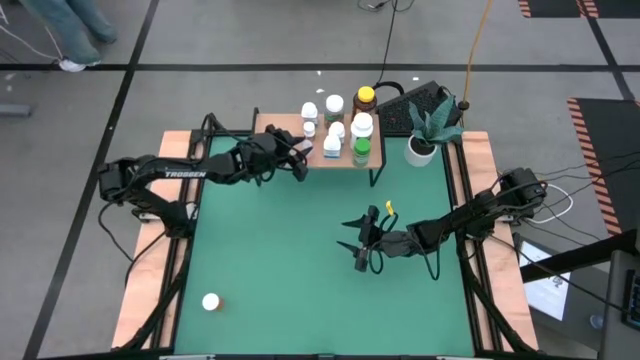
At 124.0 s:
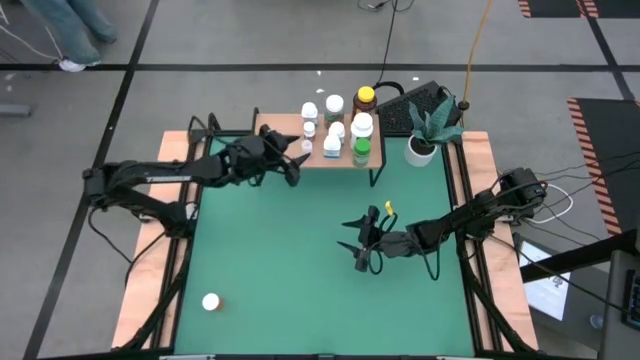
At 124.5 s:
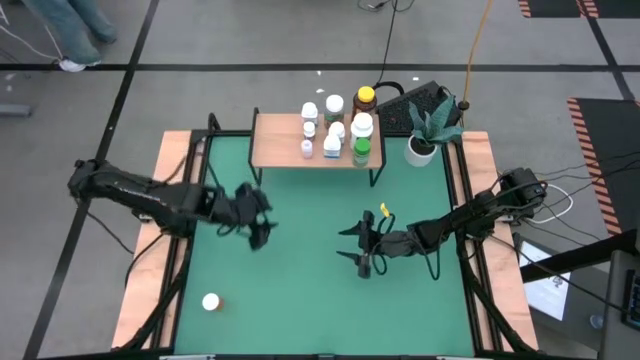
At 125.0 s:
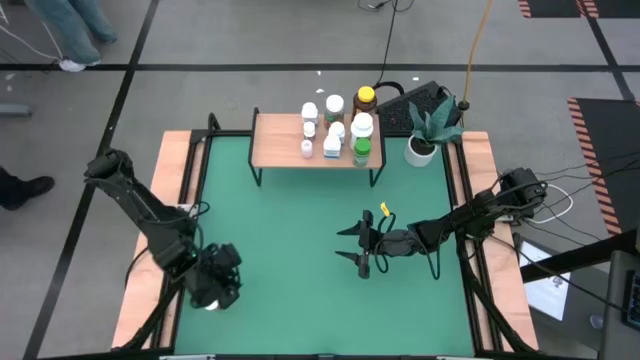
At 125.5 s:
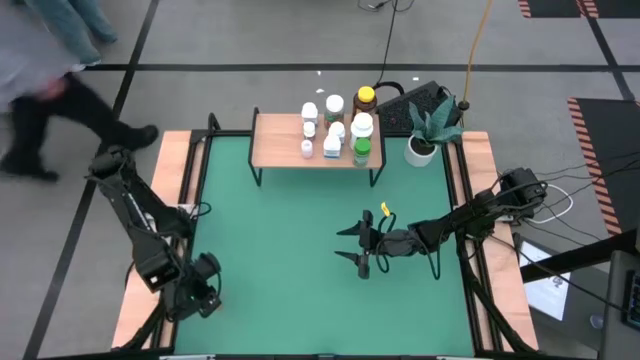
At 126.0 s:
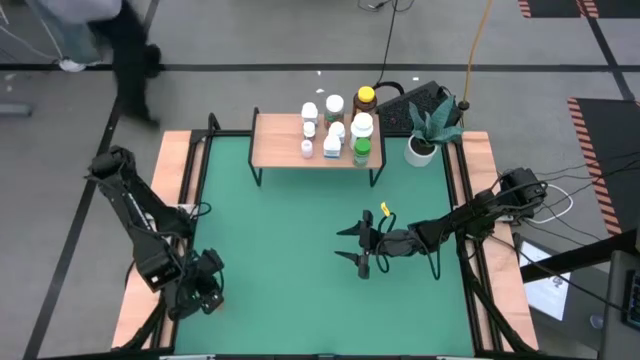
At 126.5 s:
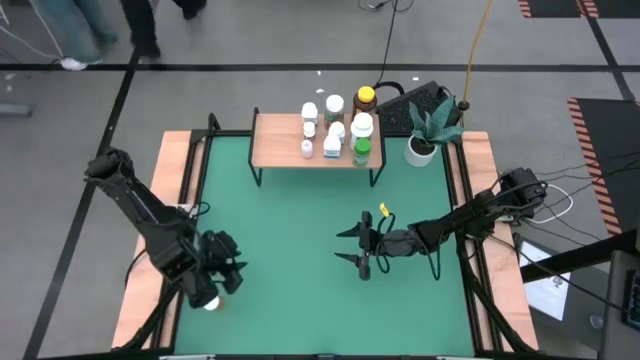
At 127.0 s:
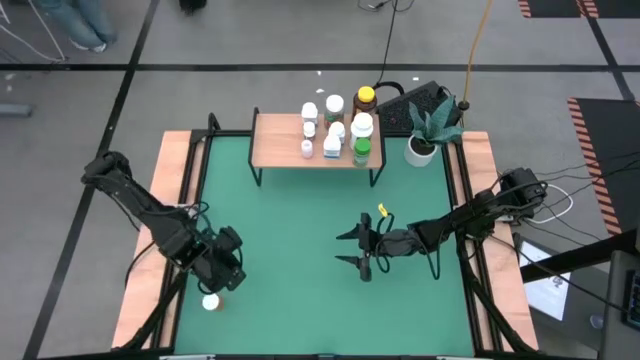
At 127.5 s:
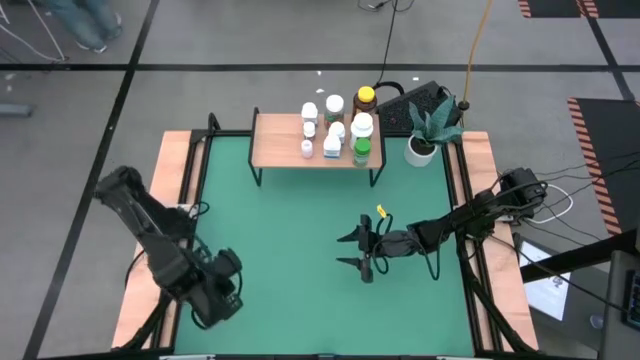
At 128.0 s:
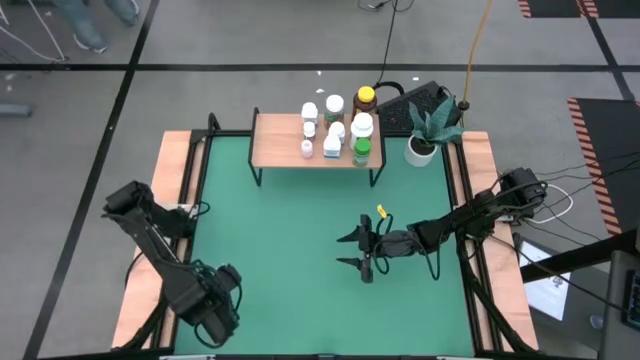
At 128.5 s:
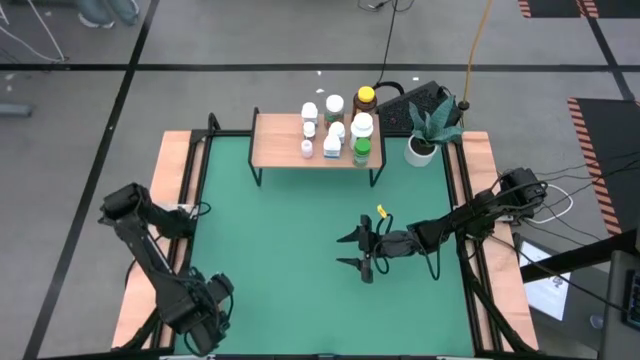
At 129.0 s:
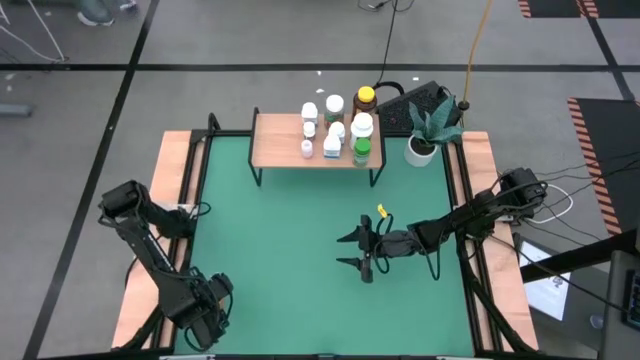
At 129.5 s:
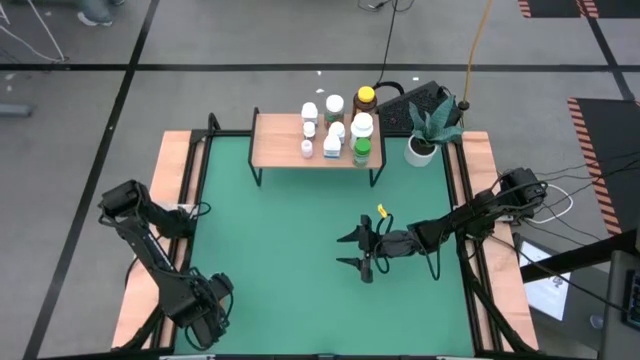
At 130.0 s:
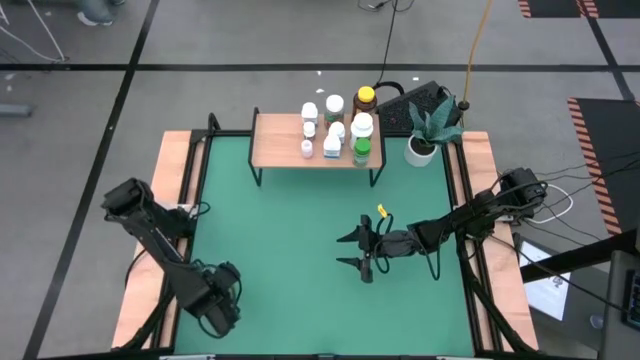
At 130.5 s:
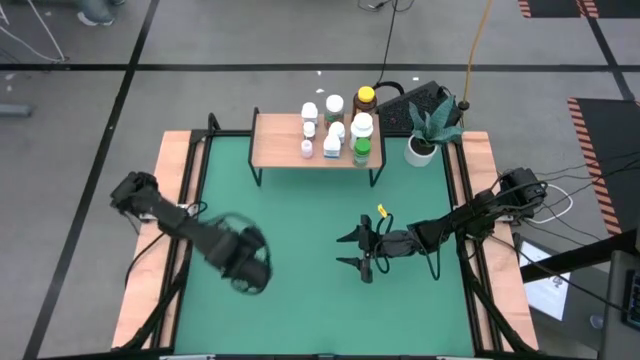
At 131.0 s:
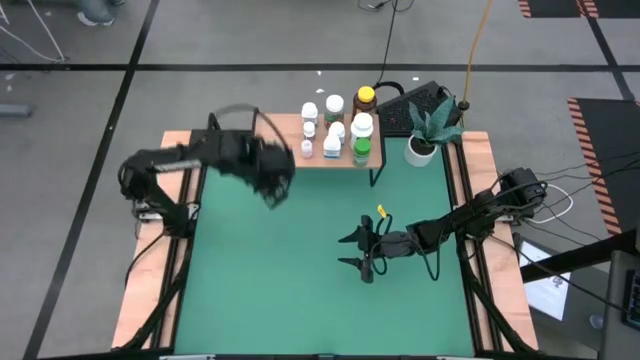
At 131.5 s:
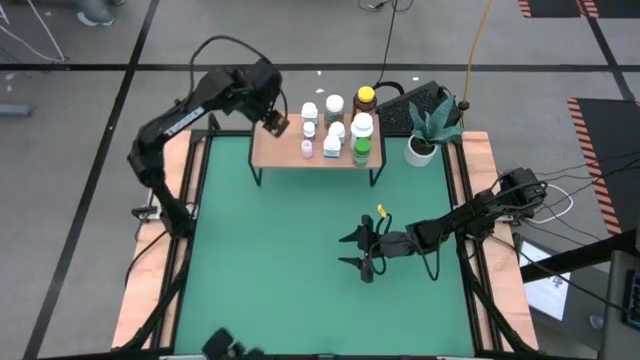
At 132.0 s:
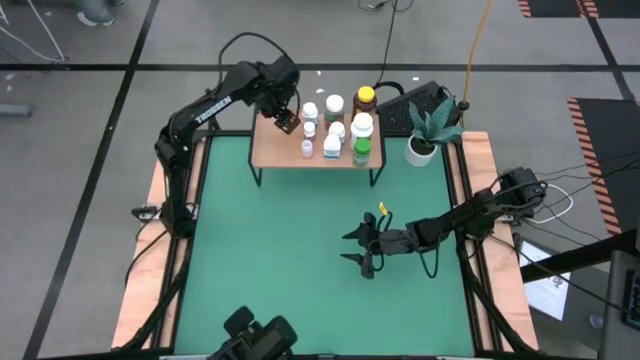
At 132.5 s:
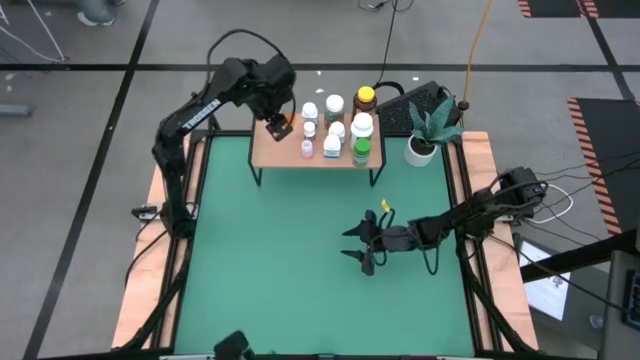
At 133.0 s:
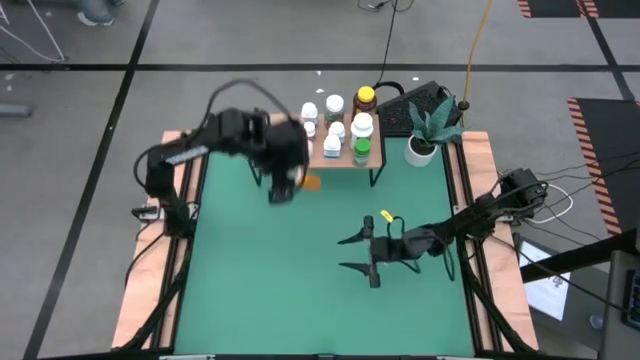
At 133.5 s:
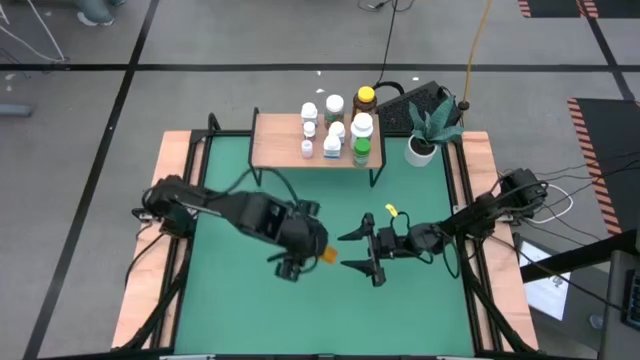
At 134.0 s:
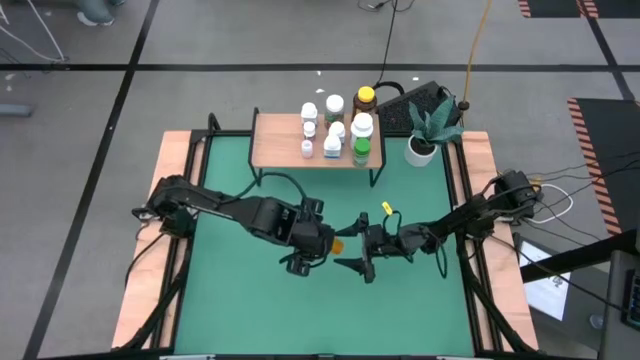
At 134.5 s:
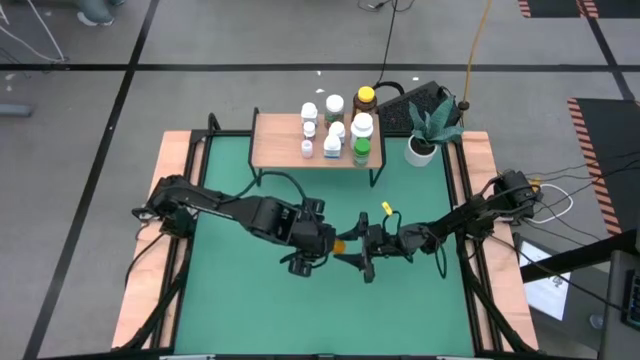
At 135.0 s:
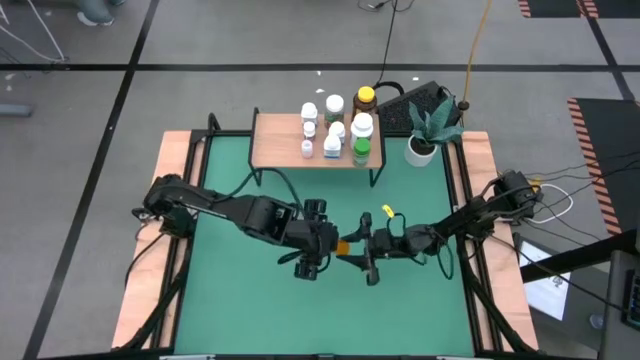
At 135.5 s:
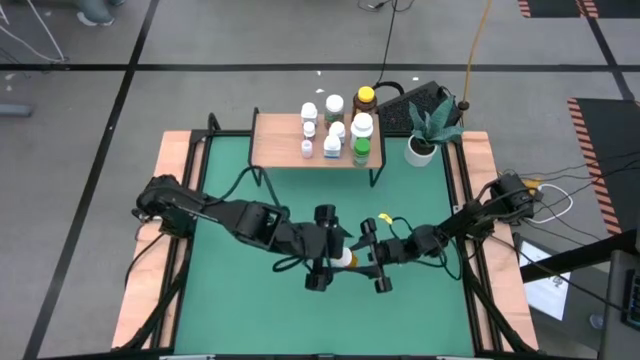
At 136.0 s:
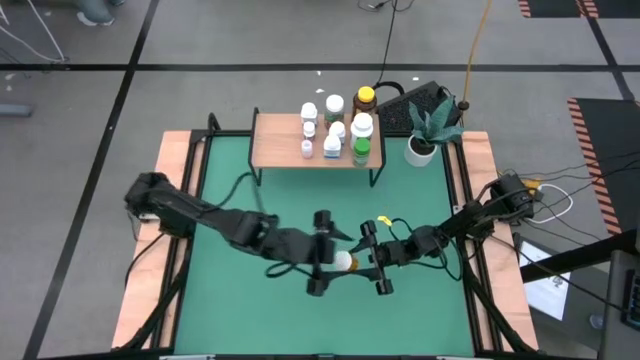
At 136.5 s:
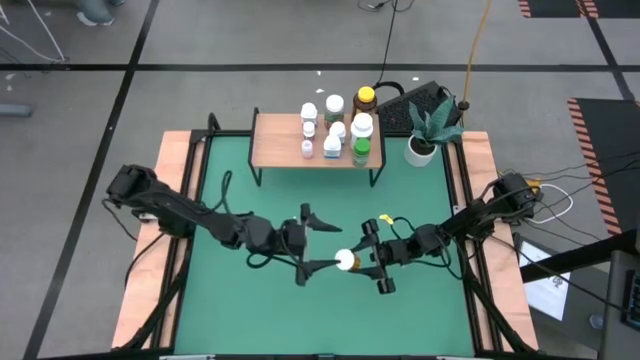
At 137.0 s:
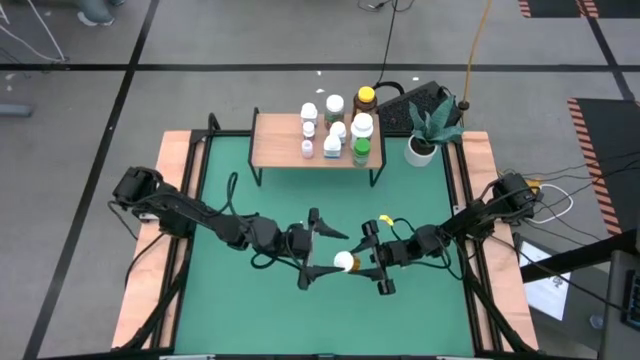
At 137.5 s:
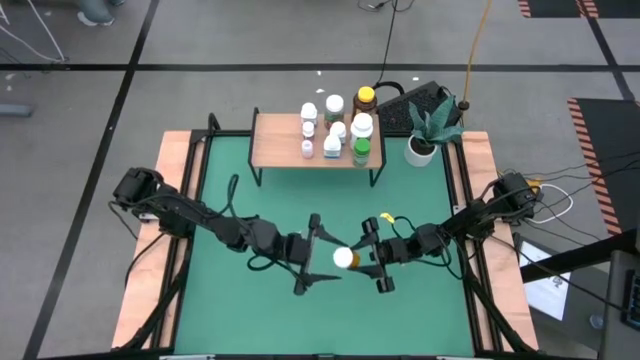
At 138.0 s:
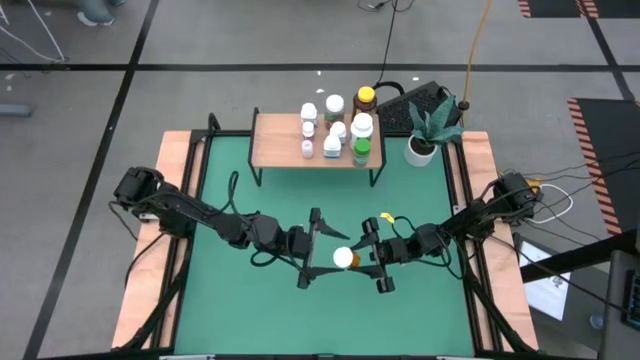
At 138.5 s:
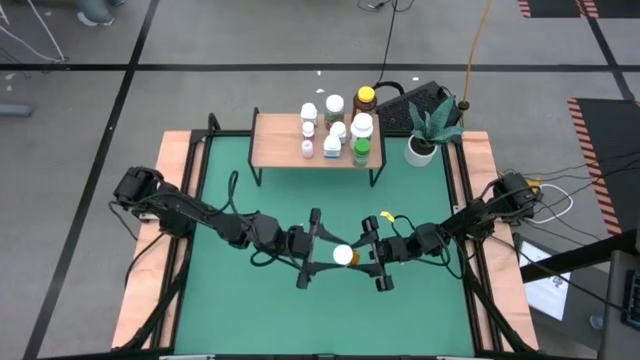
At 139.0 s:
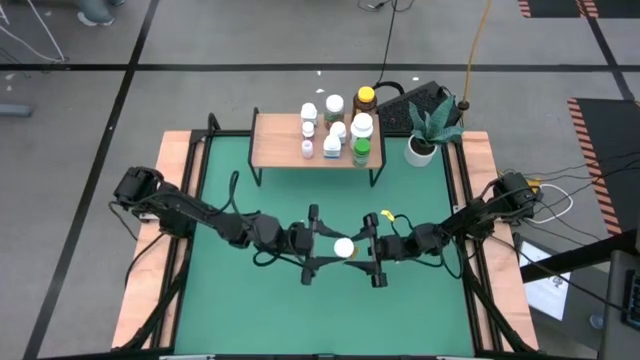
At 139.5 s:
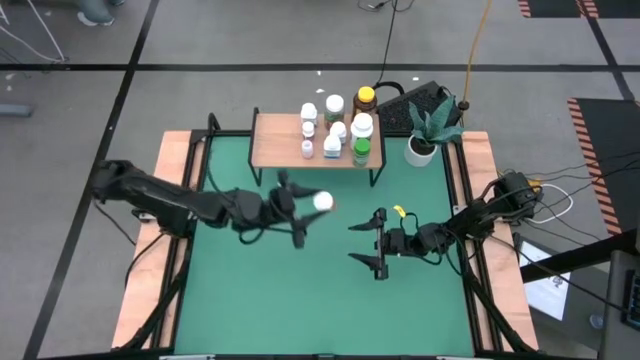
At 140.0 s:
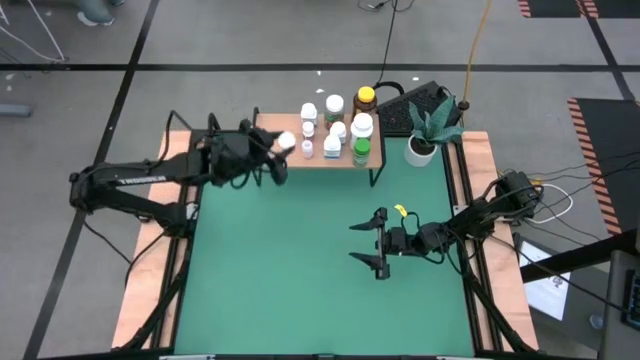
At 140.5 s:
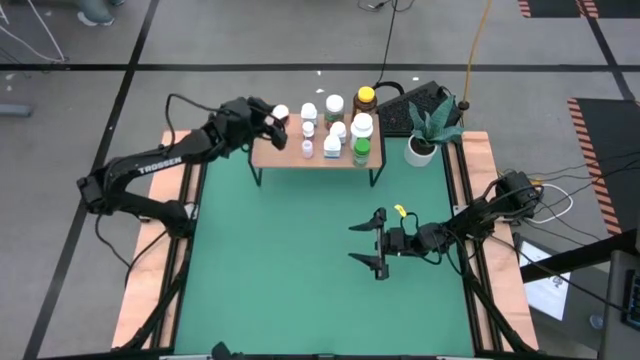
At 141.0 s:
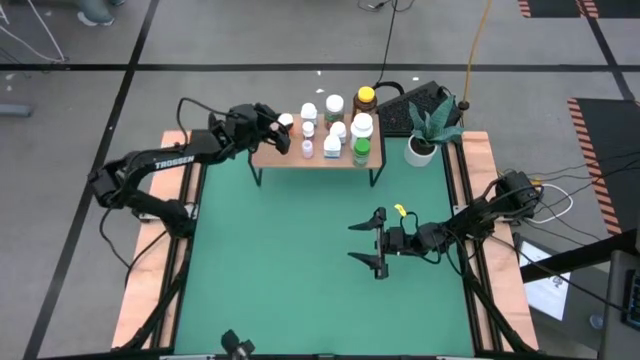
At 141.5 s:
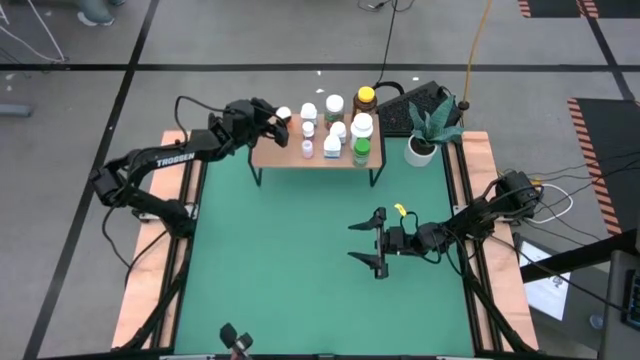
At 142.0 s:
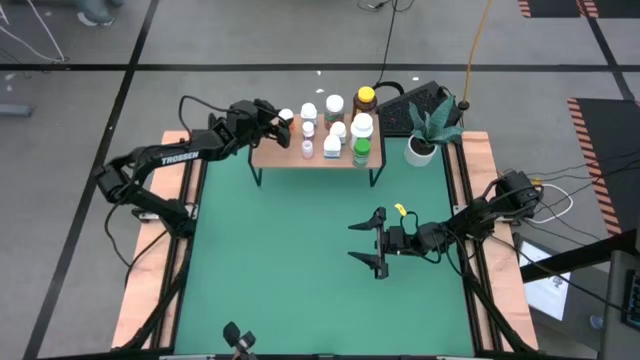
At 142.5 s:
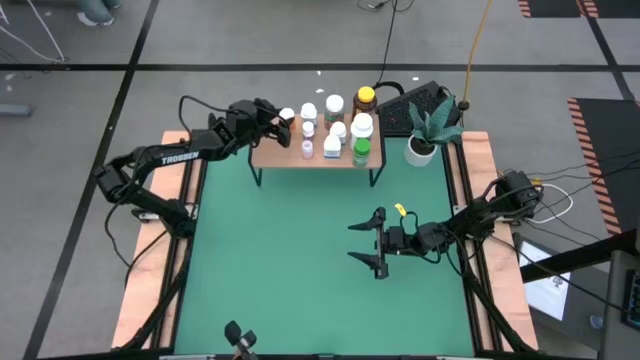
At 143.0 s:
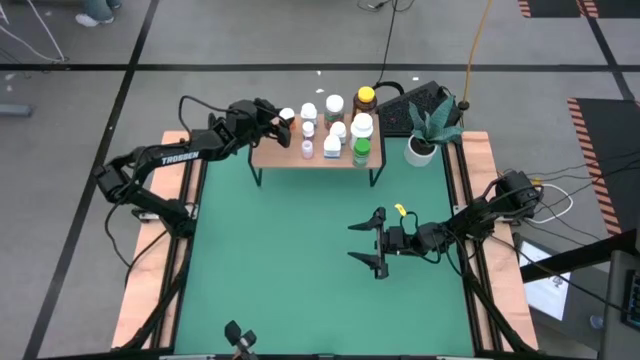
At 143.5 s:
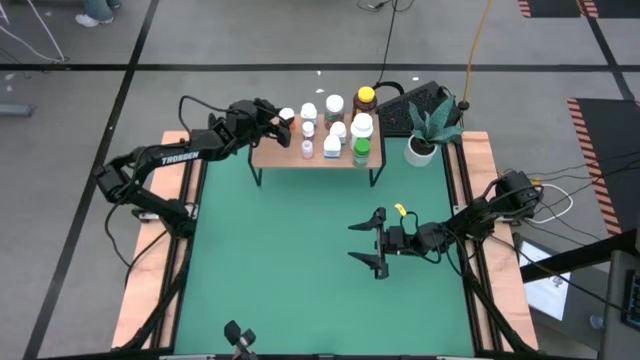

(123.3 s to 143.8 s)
Task: Pick and place medicine bottles onto shelf by color
Put the orange pill bottle on the shelf
